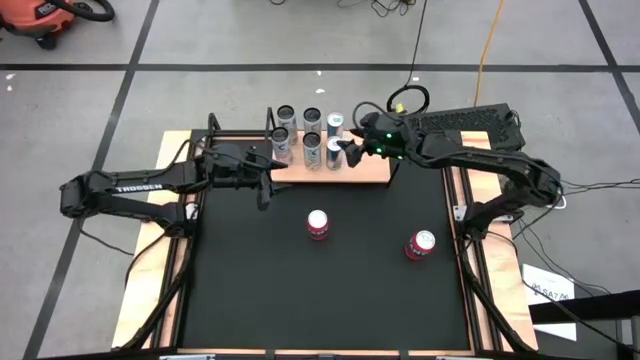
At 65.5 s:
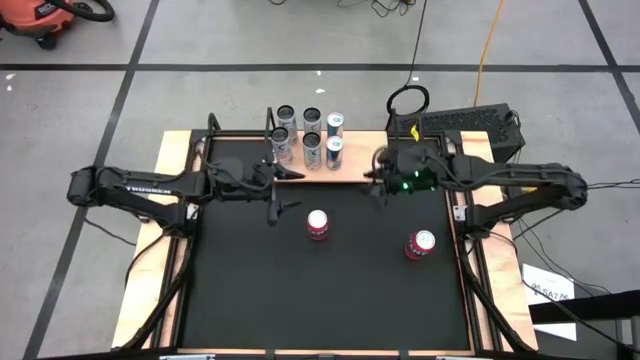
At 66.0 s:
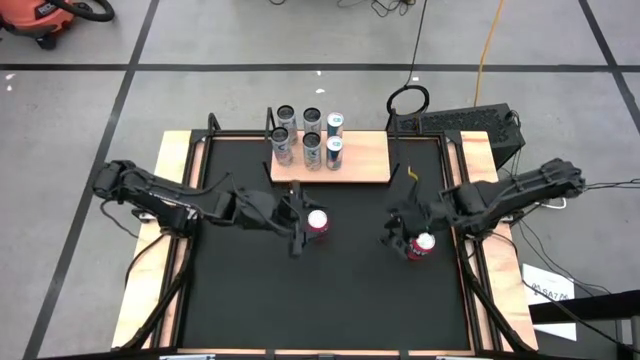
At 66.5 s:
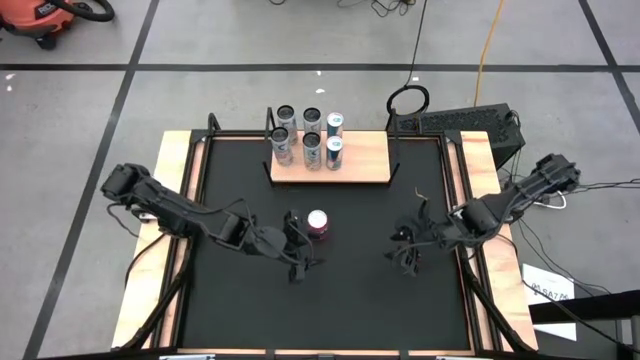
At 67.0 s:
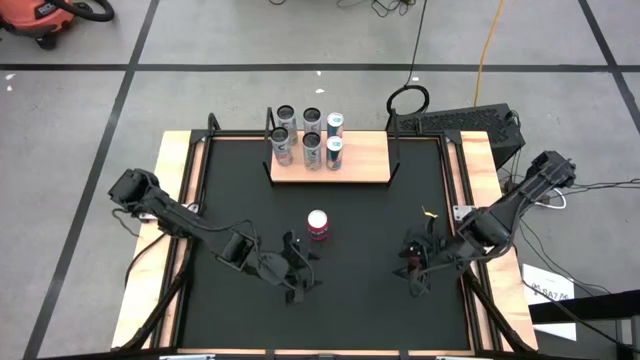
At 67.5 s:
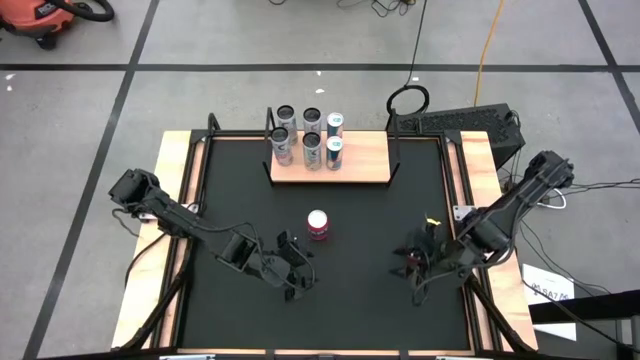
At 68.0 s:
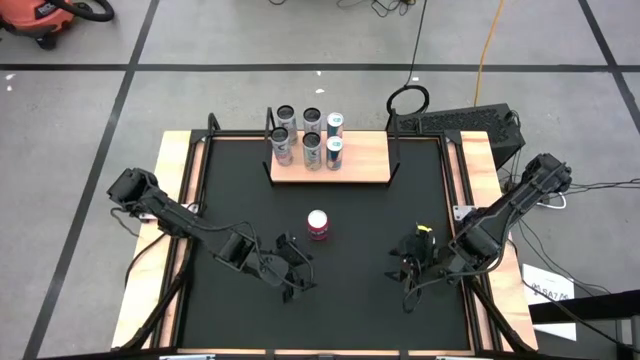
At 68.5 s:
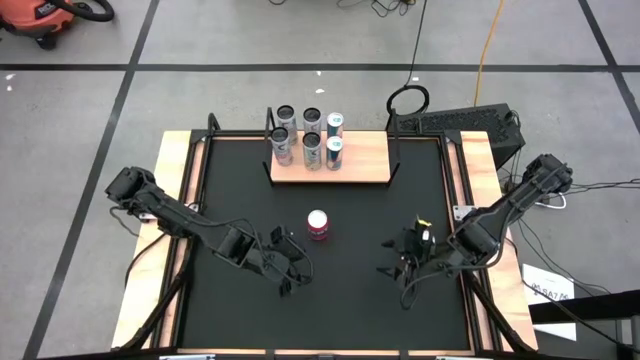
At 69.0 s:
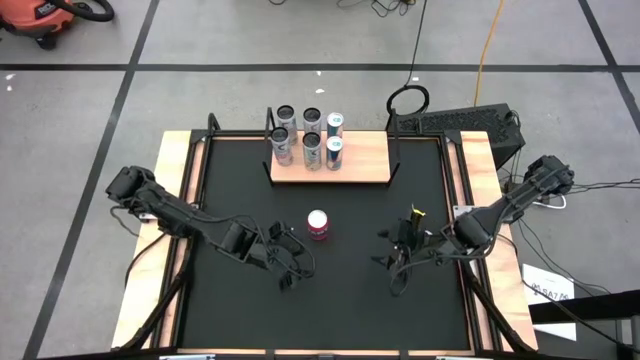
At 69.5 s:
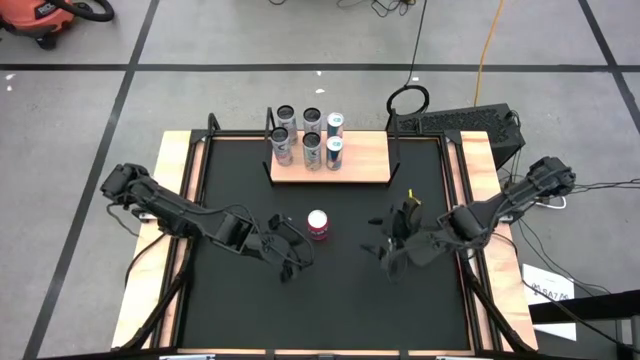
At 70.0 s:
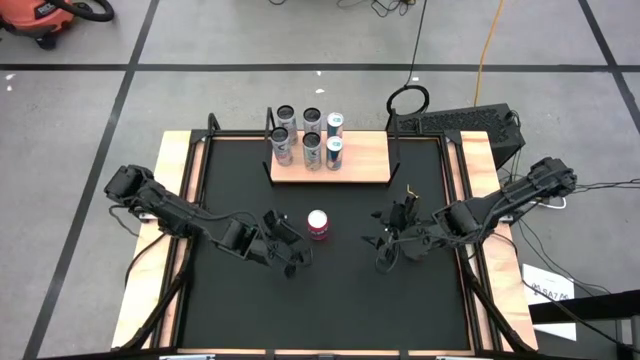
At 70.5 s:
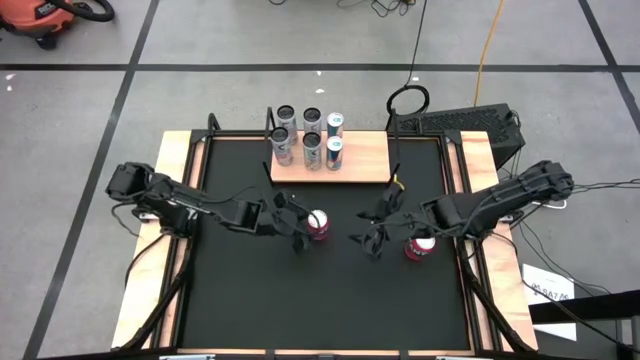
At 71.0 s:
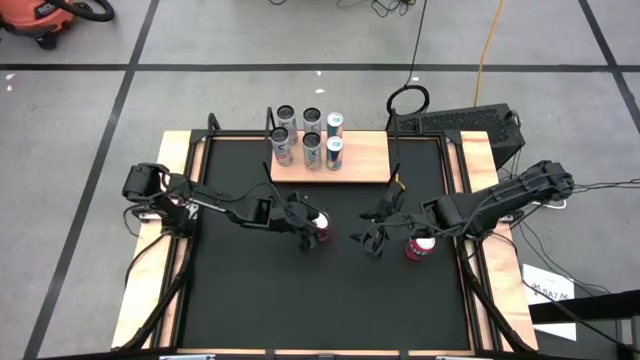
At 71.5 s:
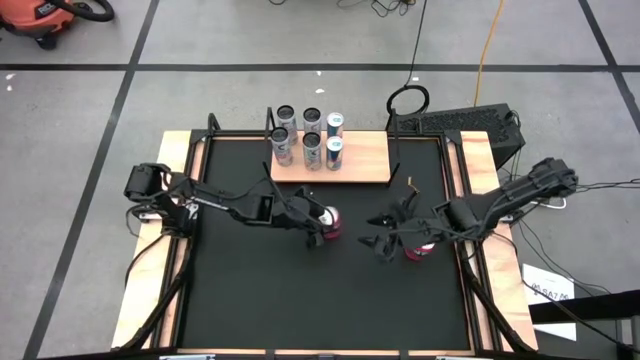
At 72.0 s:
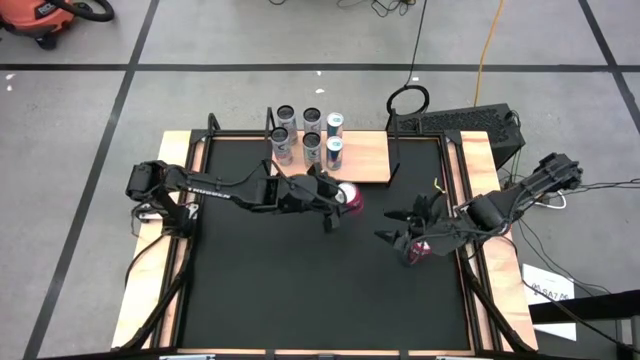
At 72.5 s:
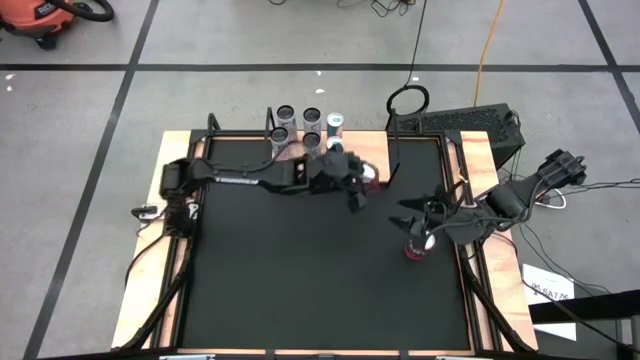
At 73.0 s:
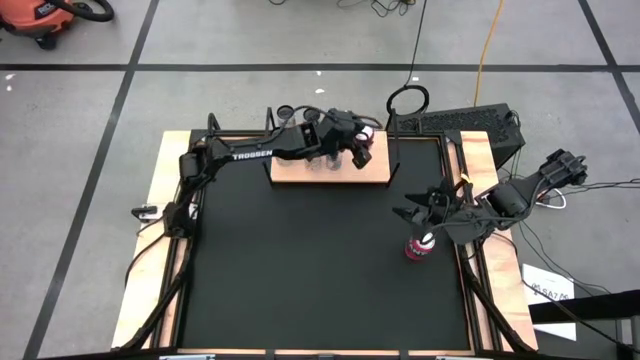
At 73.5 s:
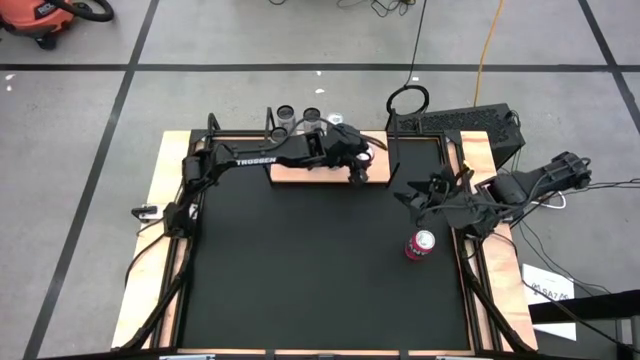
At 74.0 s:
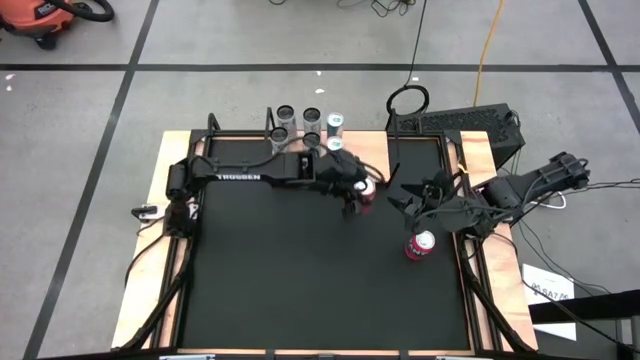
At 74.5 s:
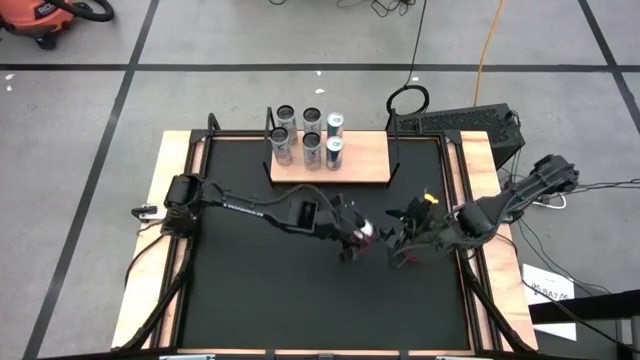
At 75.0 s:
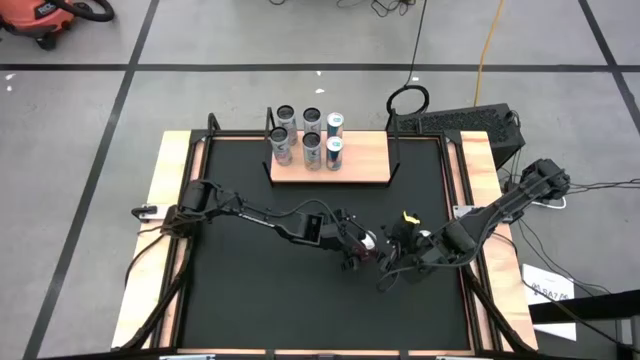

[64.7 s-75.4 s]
Task: Place canned beverage on shelf
Put the left red soda can on the shelf

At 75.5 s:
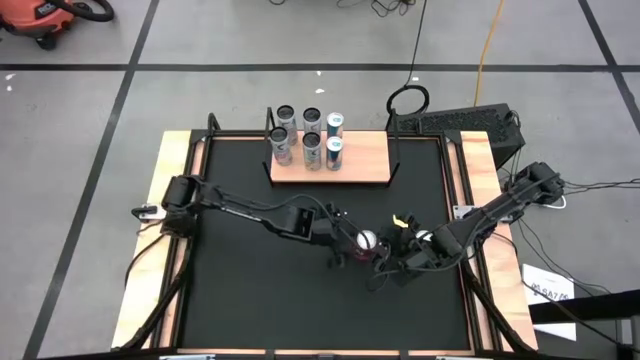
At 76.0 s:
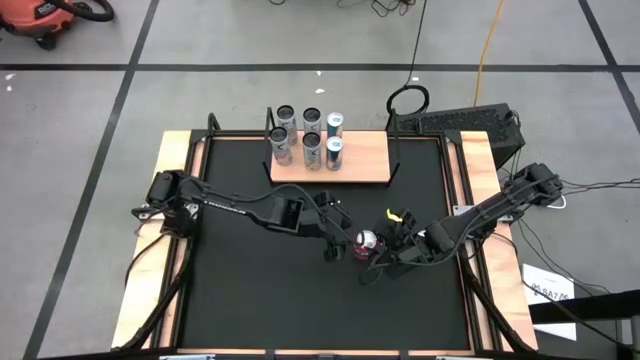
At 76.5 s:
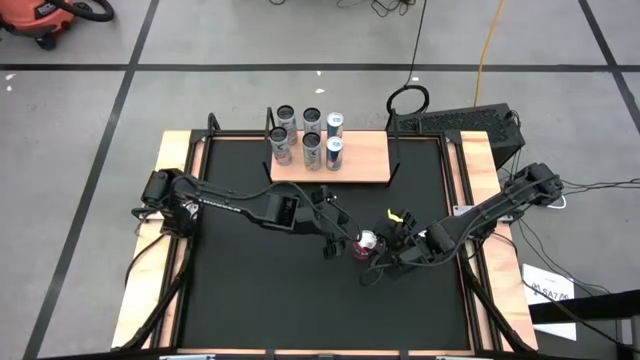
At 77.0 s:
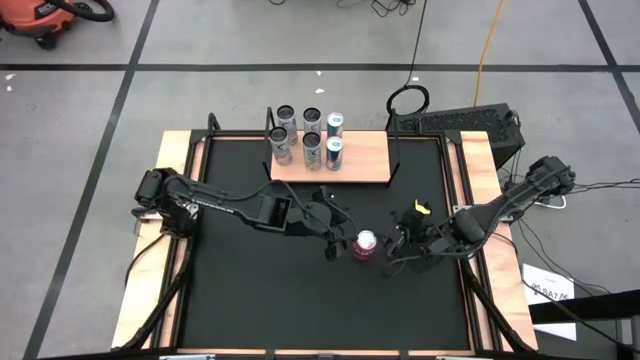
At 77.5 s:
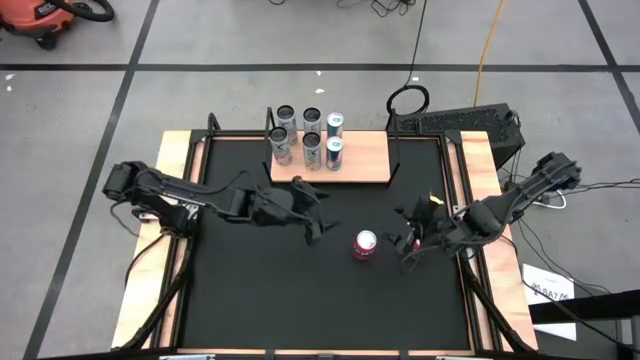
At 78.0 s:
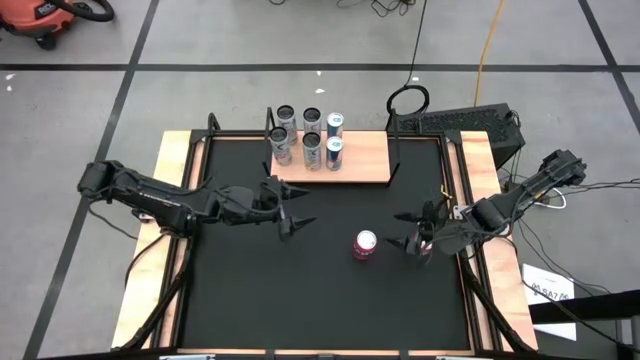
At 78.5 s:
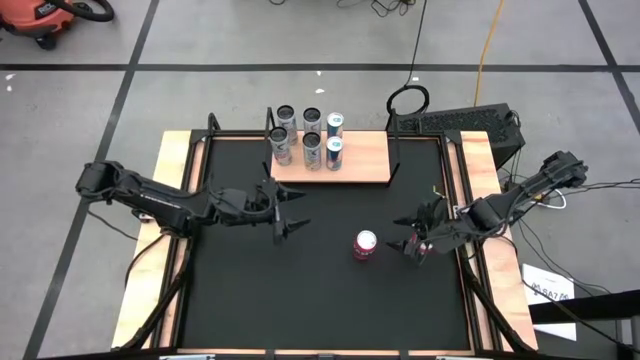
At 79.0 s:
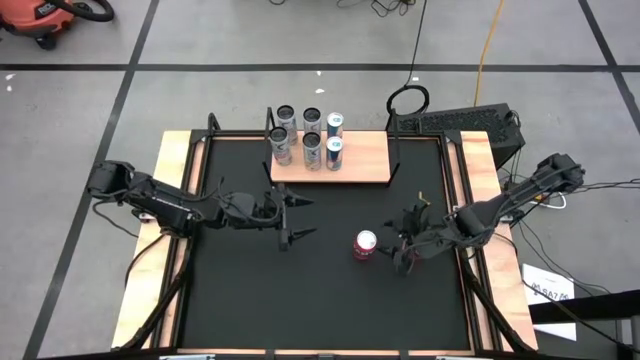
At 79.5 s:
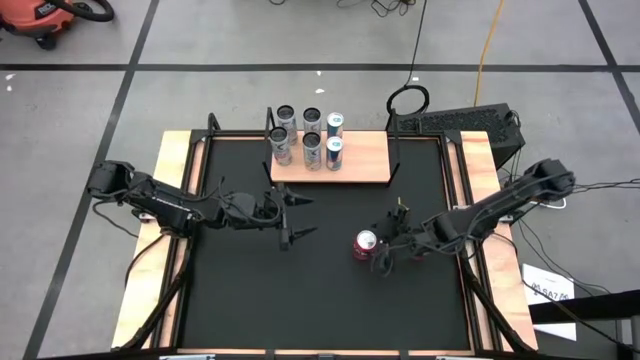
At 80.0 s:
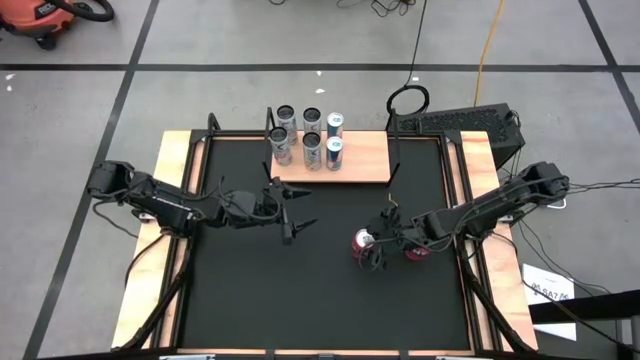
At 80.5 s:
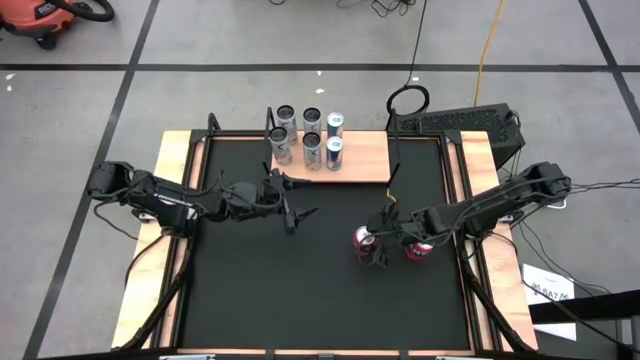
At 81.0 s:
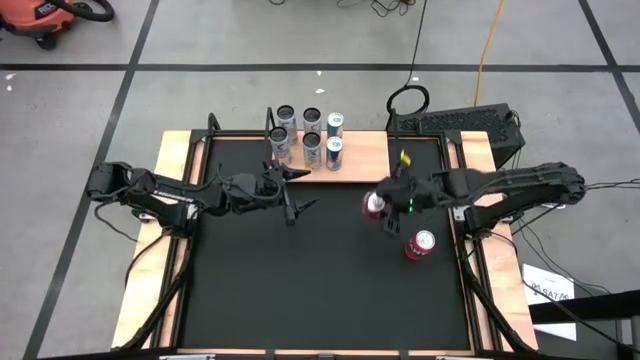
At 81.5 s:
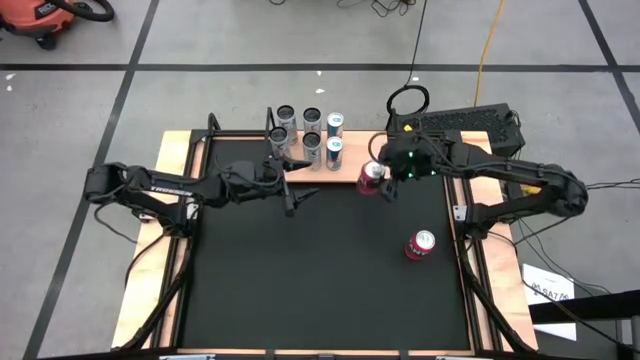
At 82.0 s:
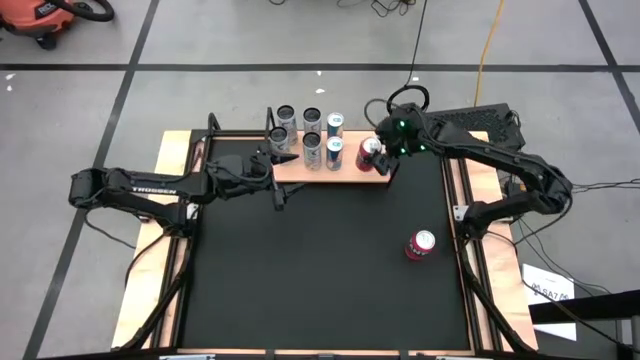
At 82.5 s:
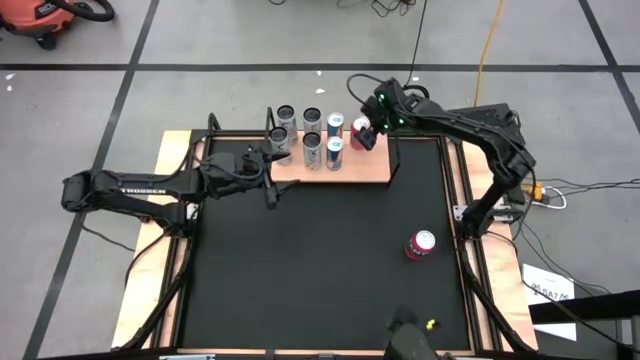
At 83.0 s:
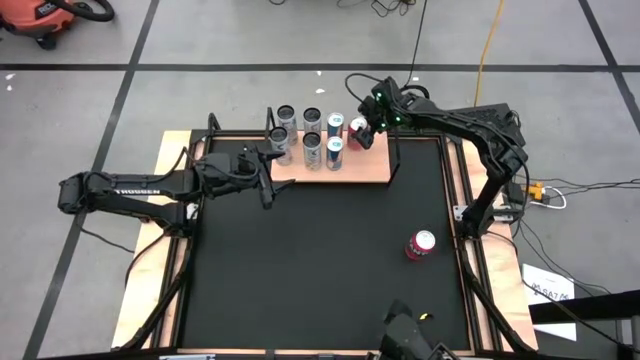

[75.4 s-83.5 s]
Put the left red soda can on the shelf

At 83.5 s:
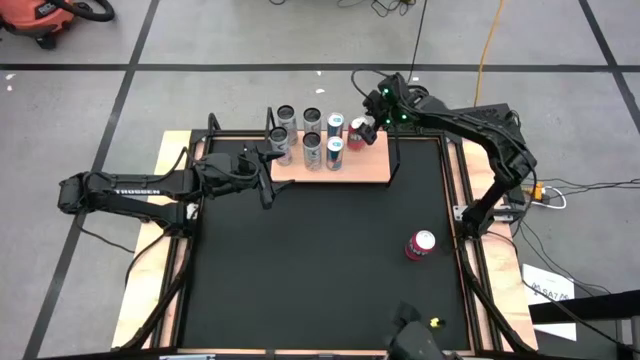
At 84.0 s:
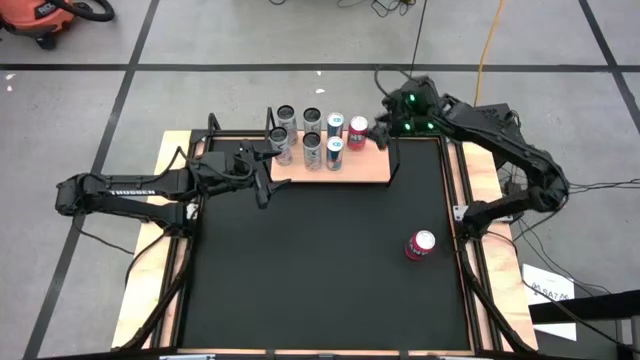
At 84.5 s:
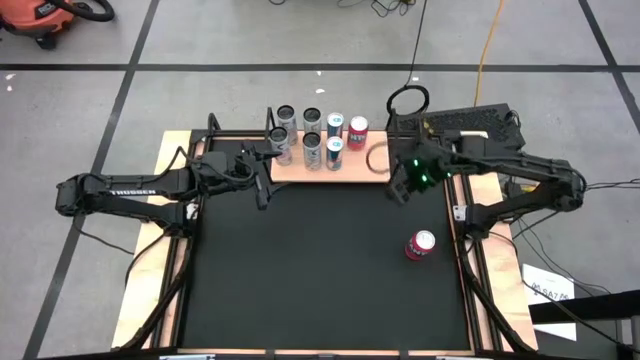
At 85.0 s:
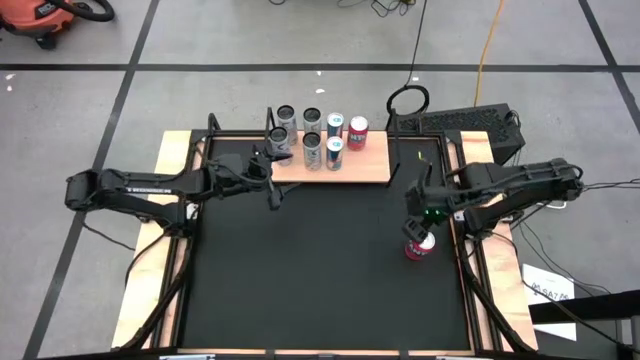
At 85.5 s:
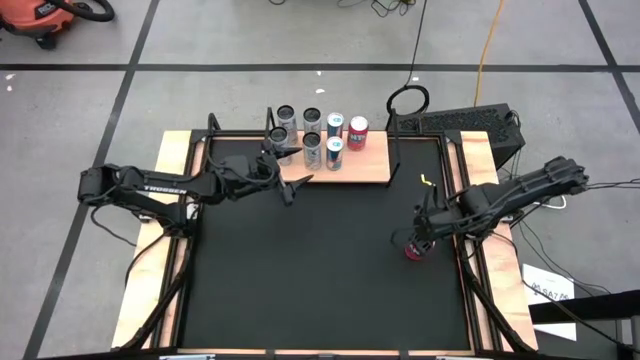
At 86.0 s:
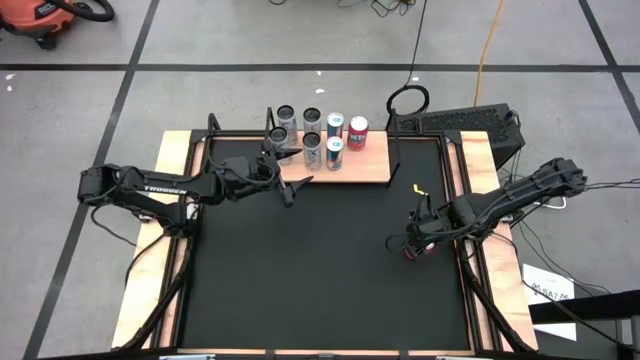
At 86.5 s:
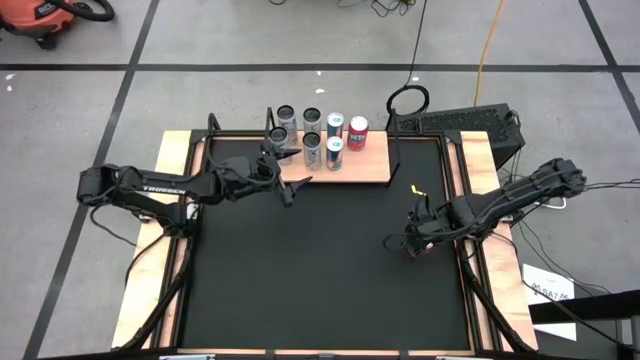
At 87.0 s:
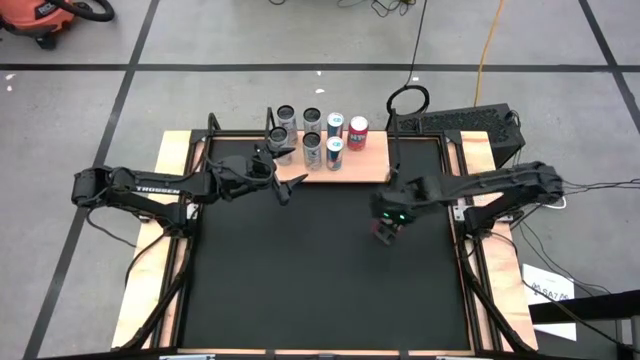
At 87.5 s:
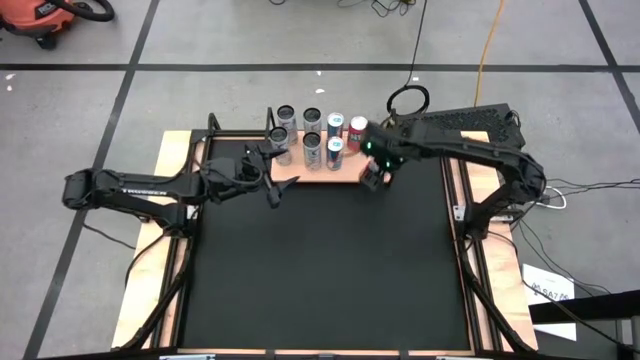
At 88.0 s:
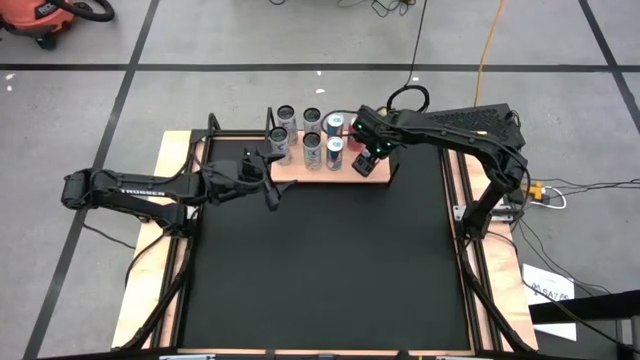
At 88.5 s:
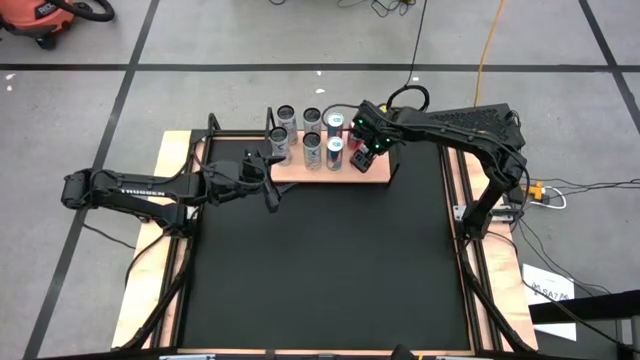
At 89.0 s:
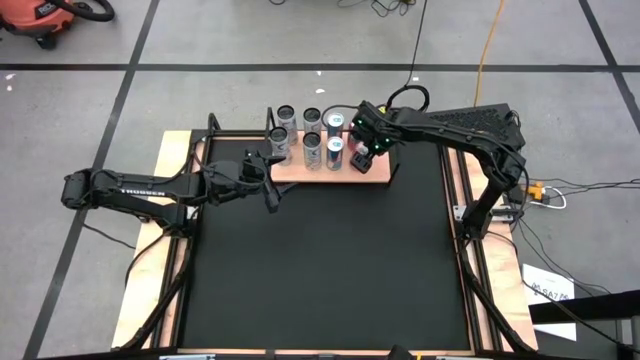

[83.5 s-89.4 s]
Put the red soda can on the shelf aligned with the other red soda can on the shelf
